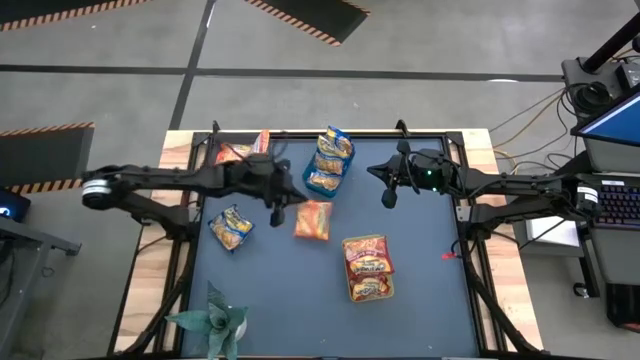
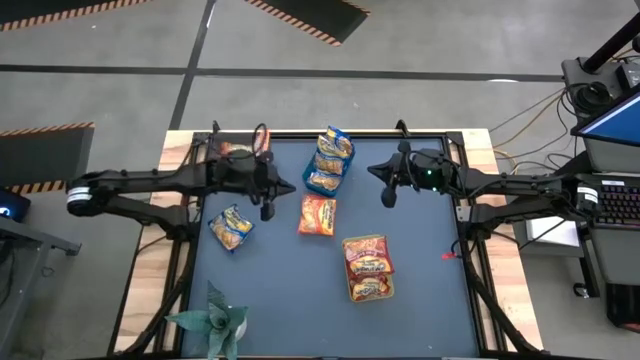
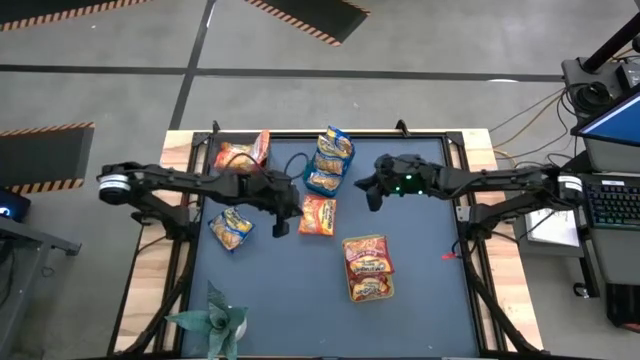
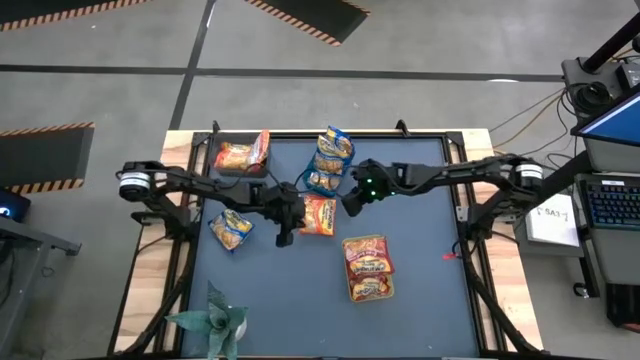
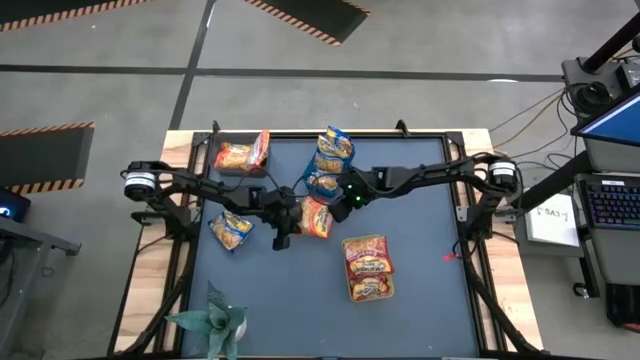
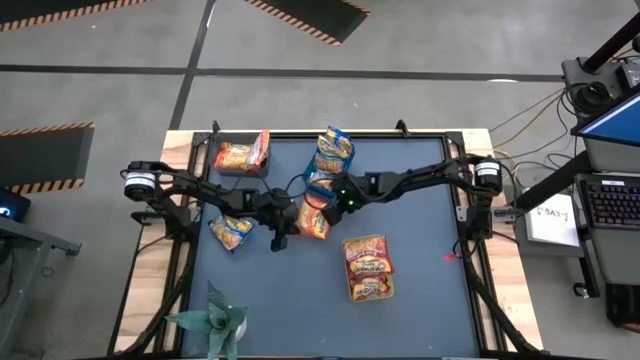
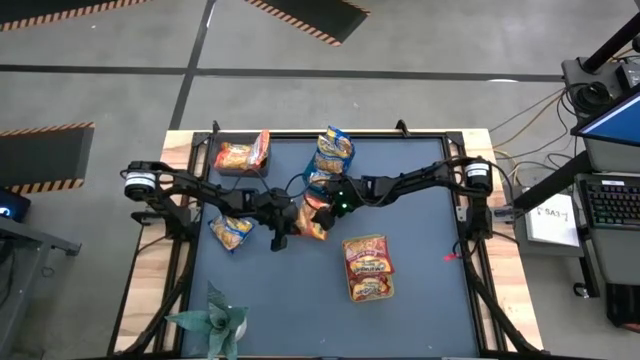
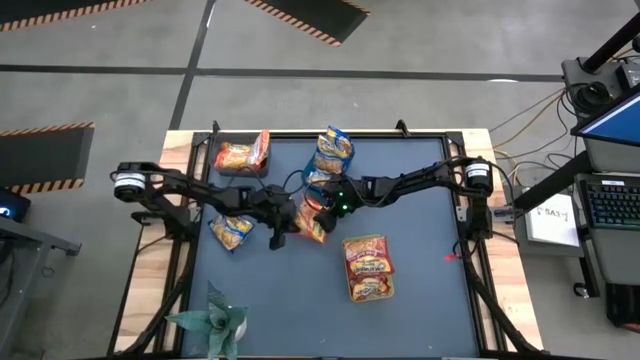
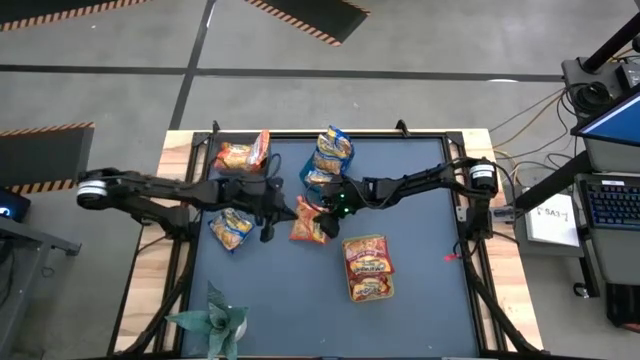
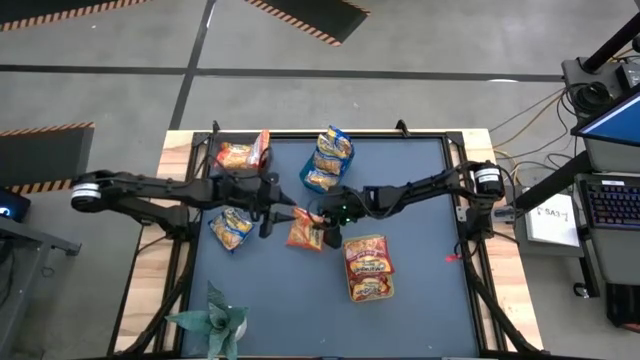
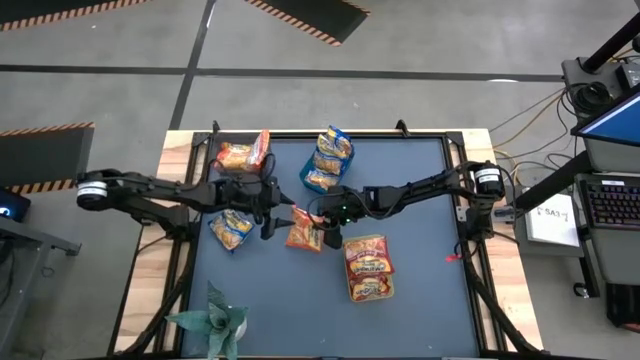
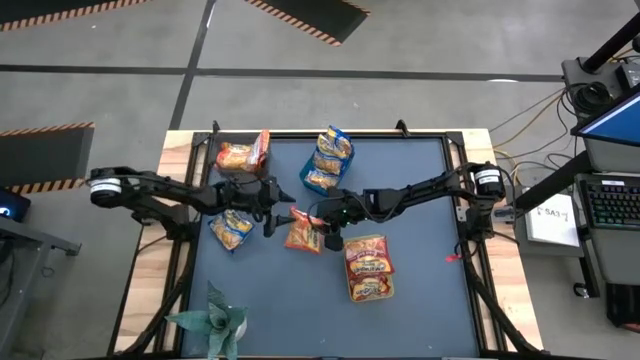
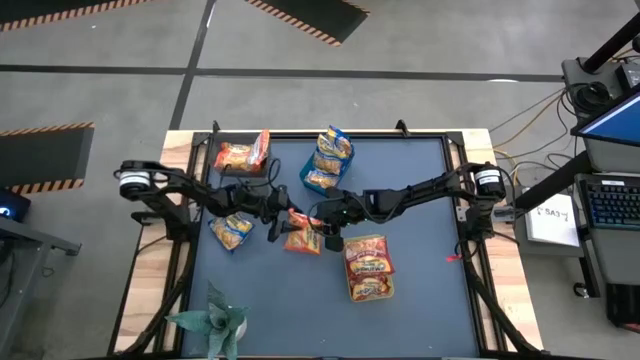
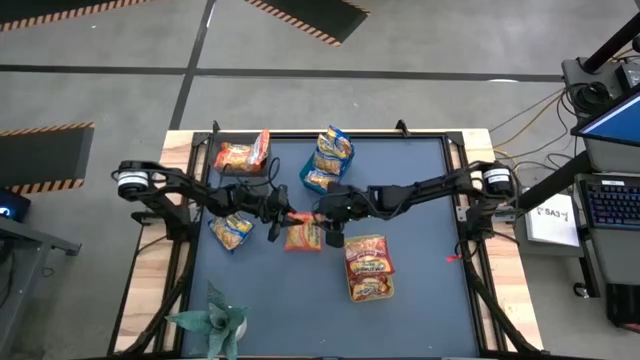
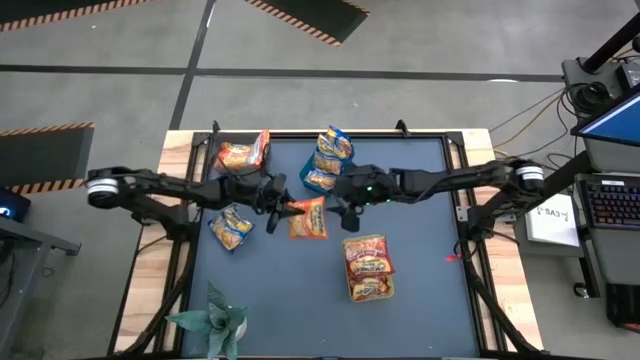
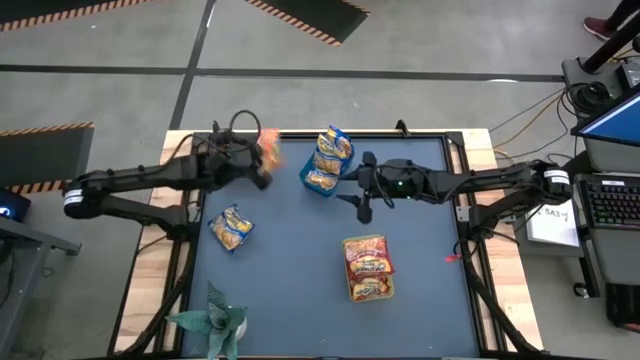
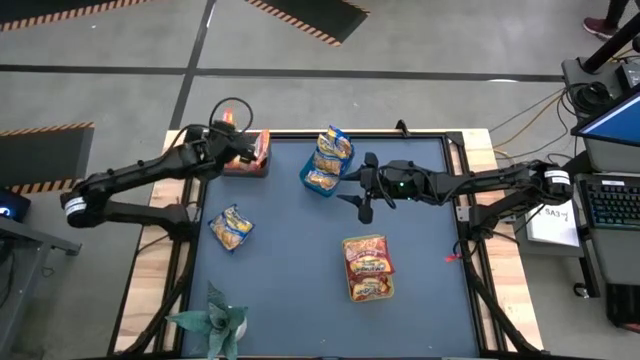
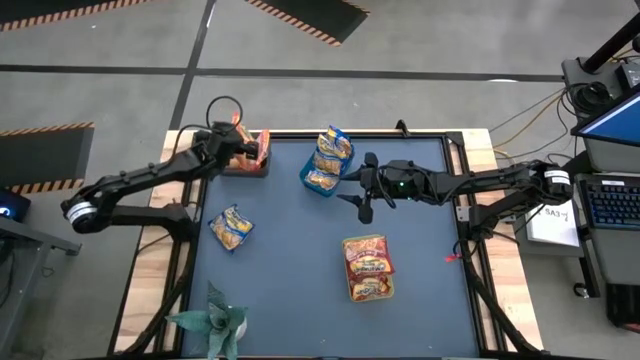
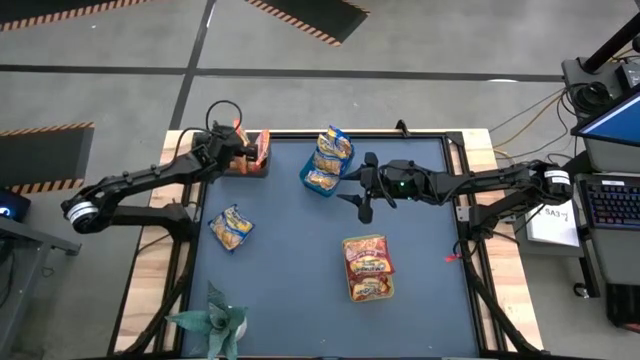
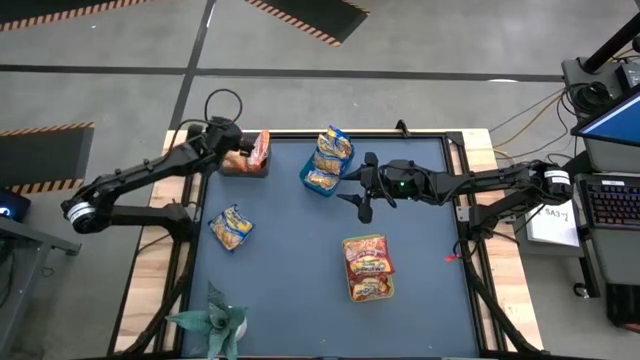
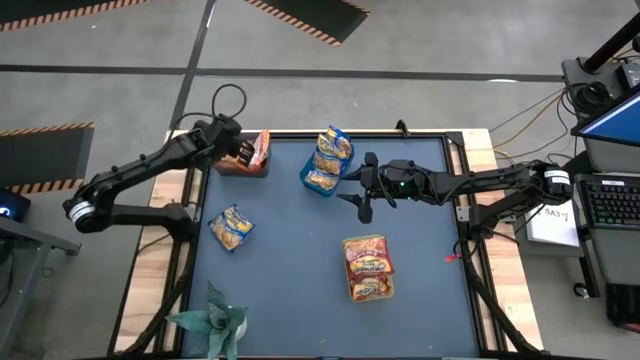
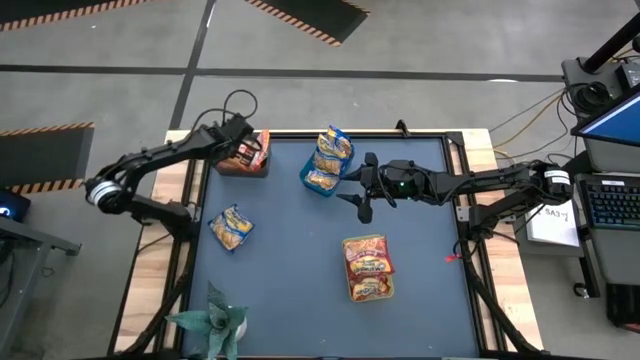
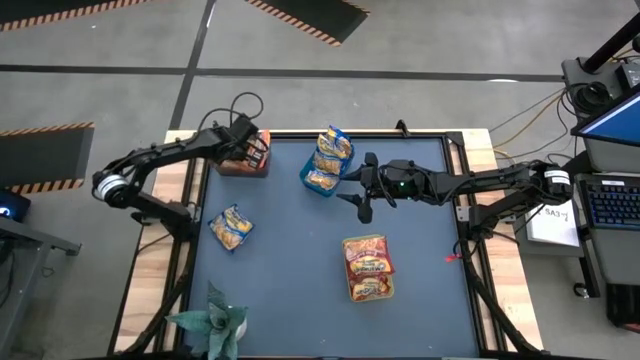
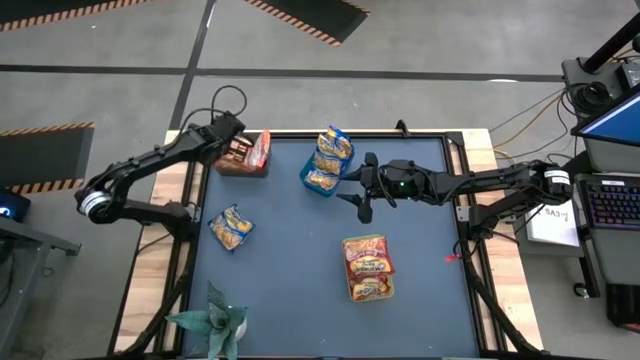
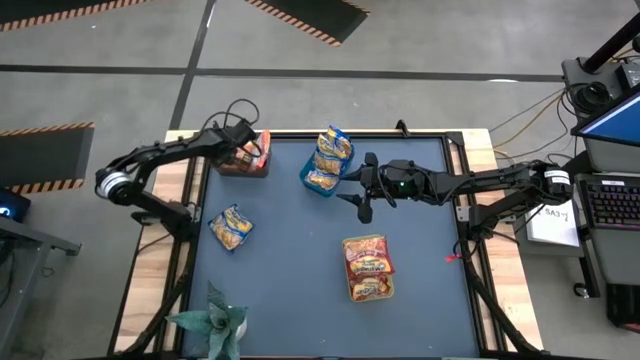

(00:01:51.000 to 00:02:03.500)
Task: Sort Maruchan noodles
Put the orange noodle pack into the black bin

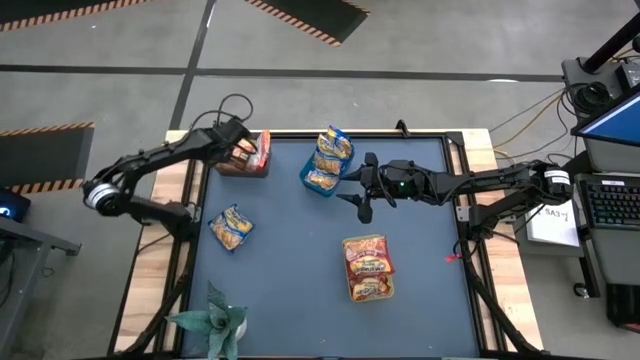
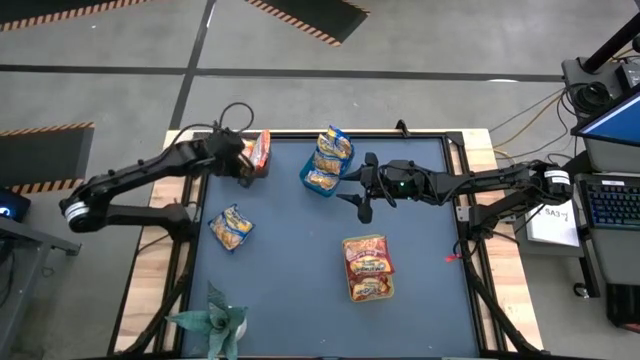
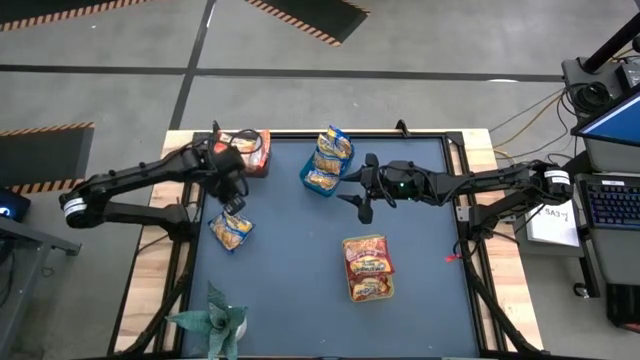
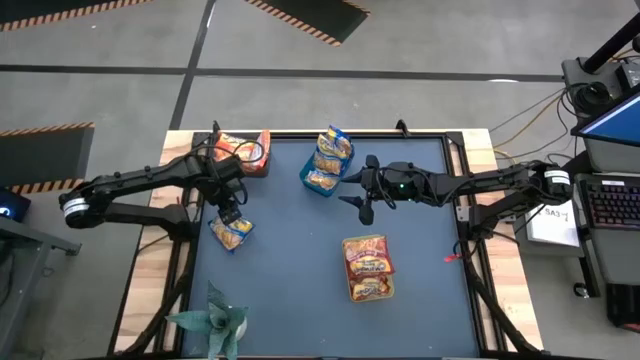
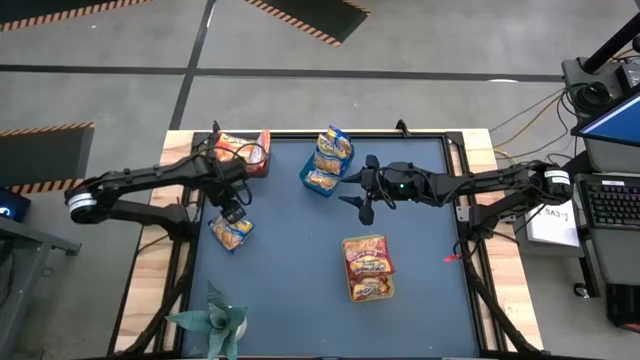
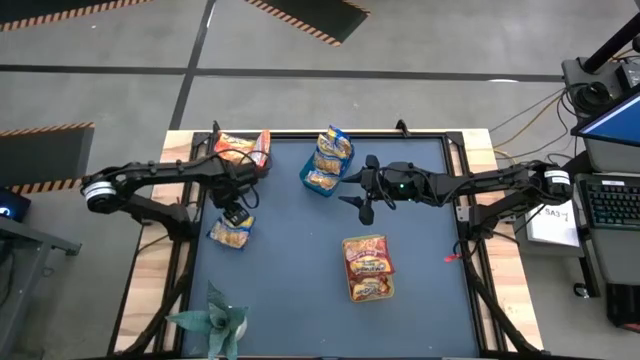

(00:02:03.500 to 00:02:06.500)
Put the blue noodle pack into the blue bin

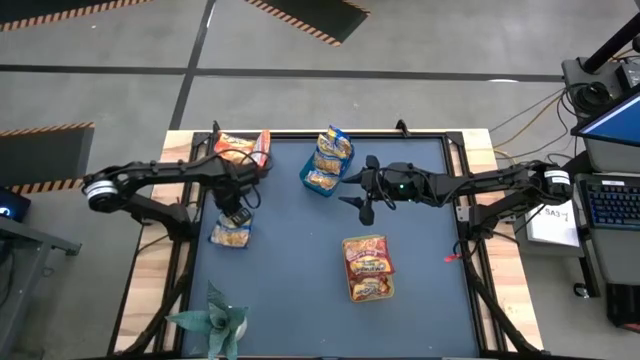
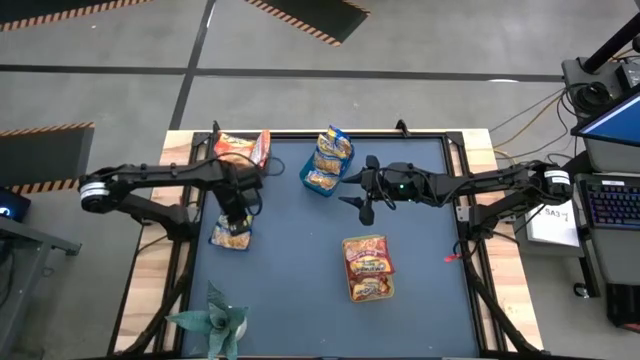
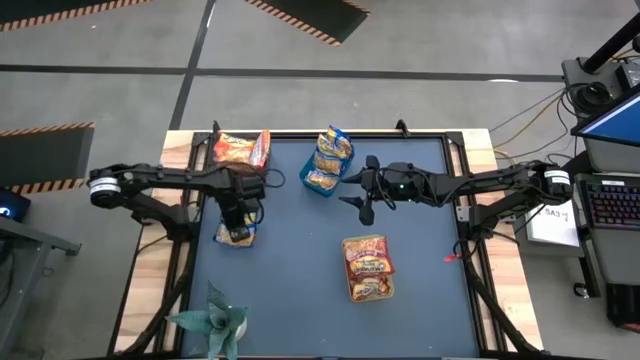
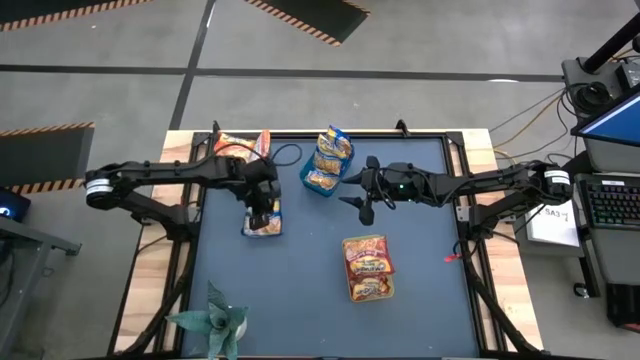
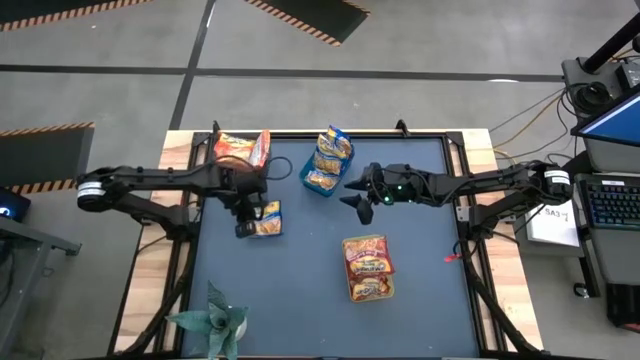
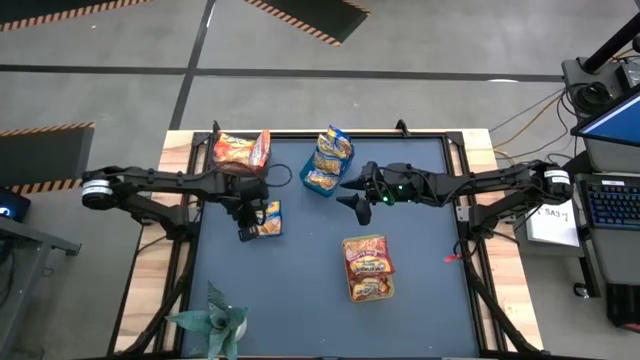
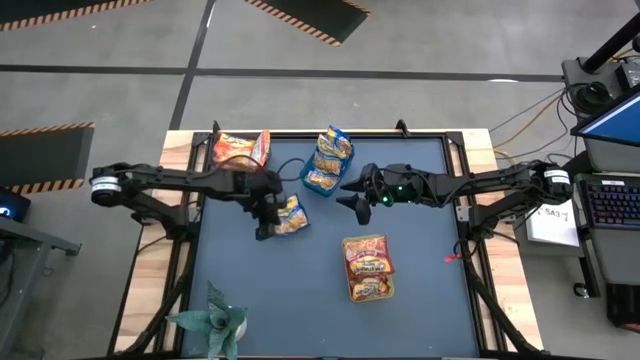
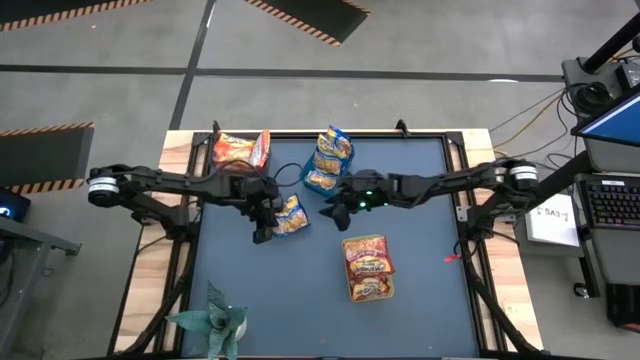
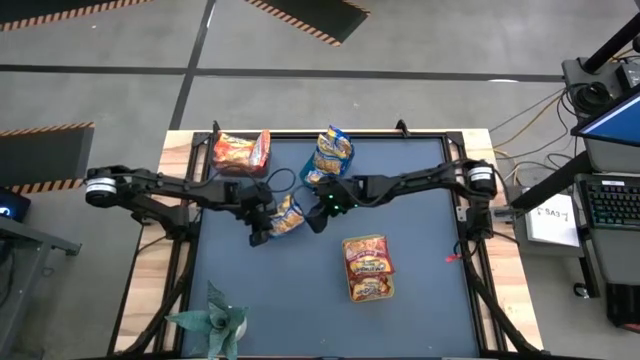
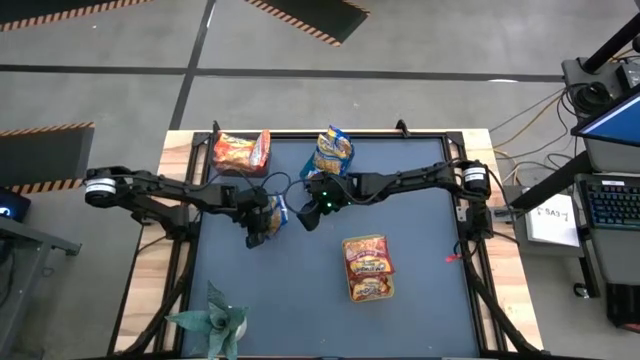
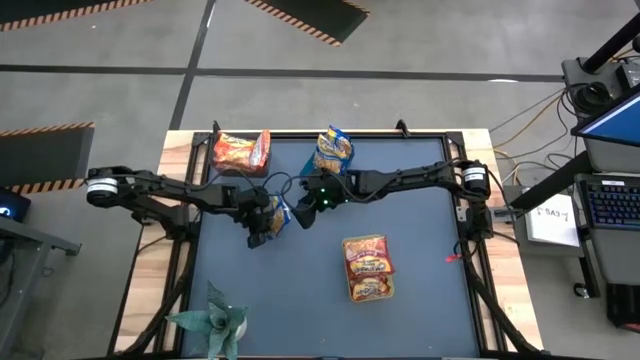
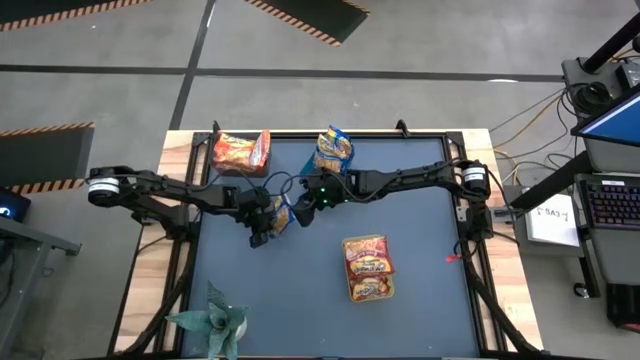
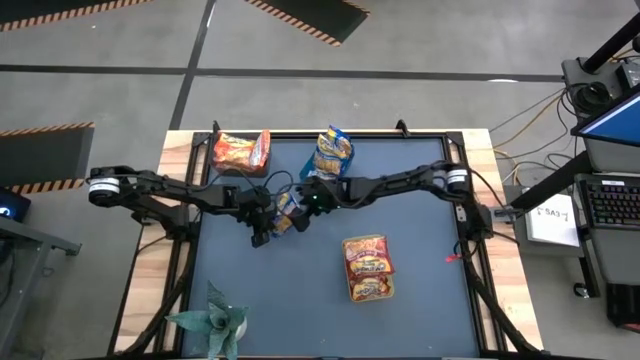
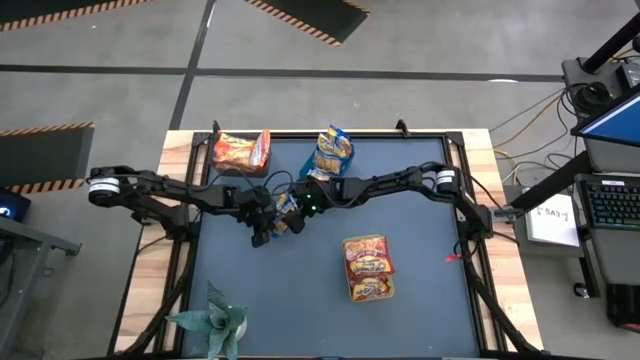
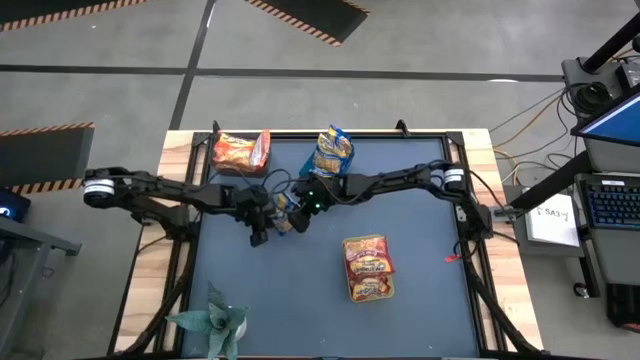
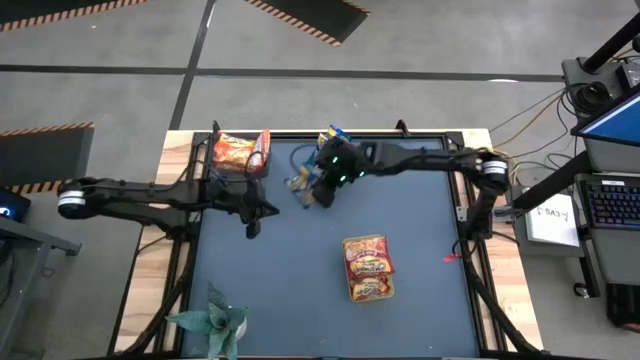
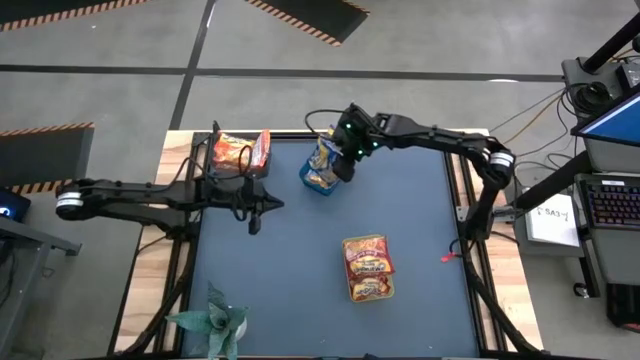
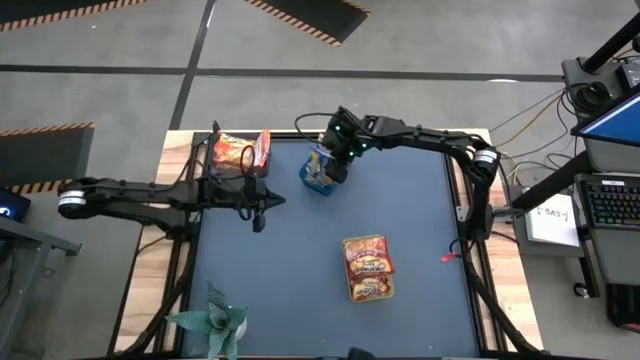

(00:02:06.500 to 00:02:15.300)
Put the blue noodle pack into the blue bin
